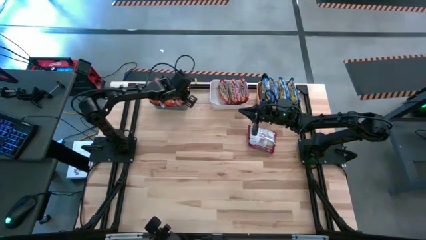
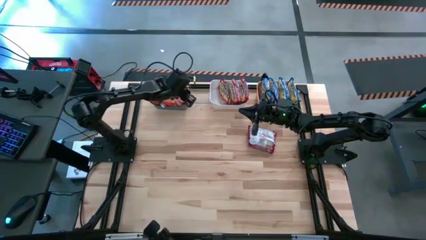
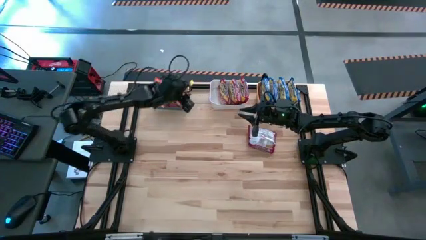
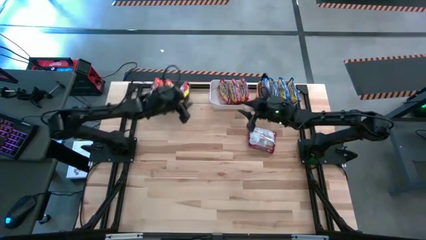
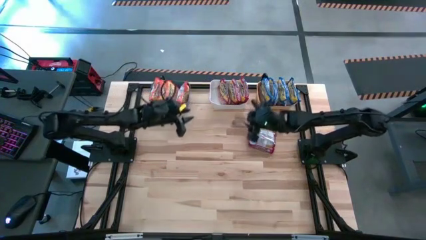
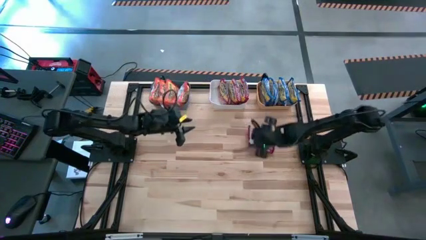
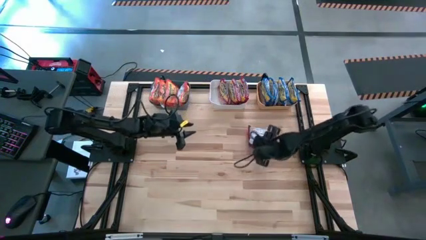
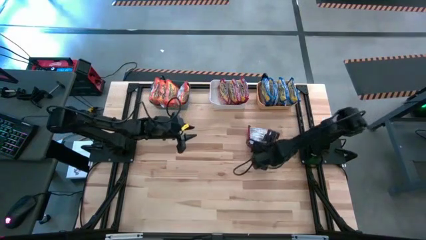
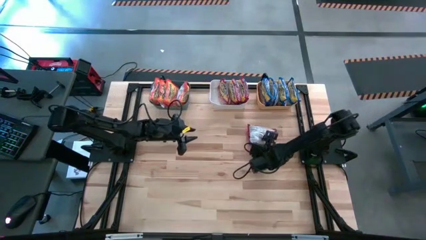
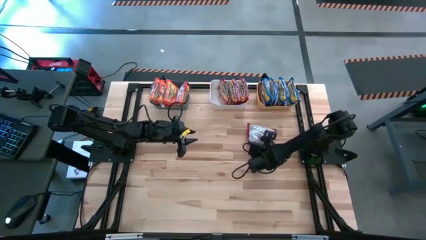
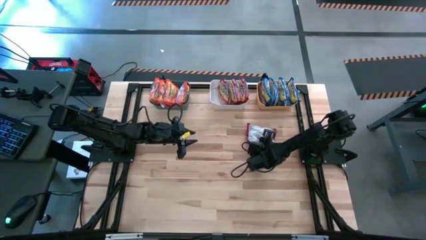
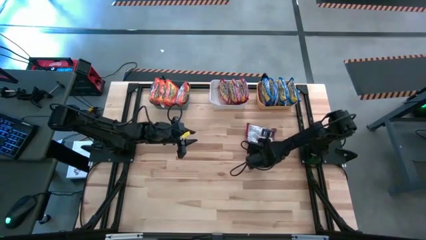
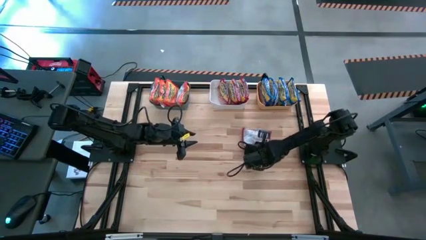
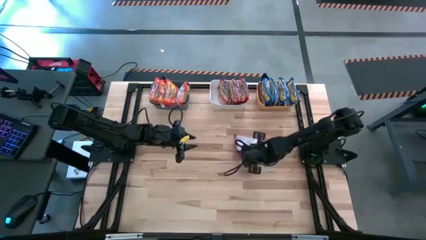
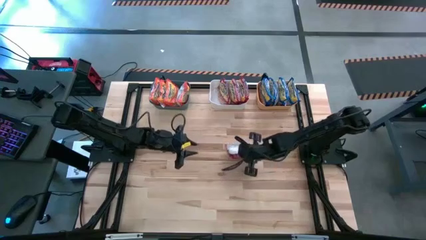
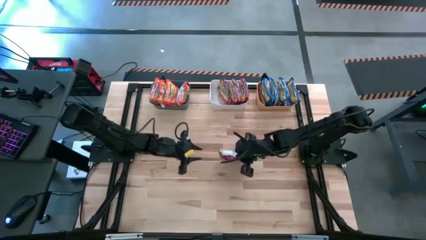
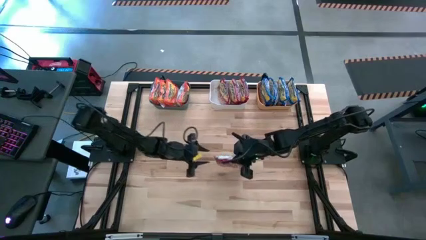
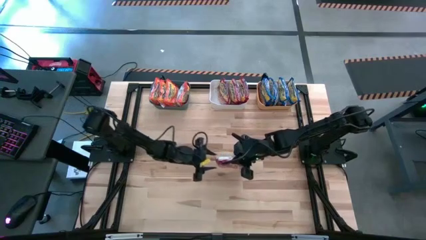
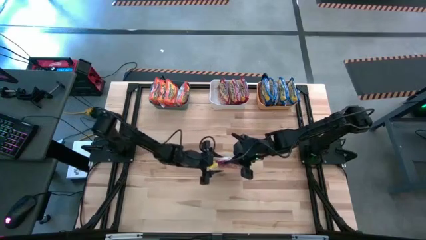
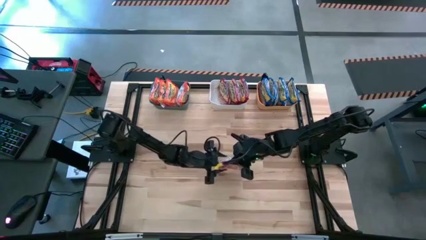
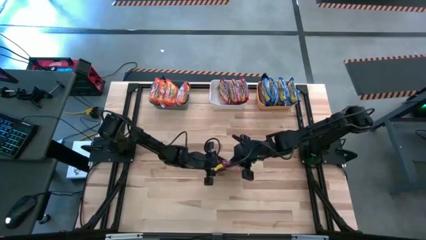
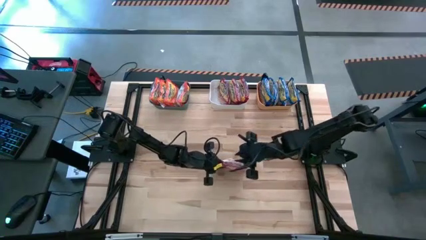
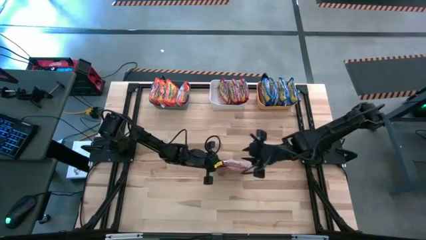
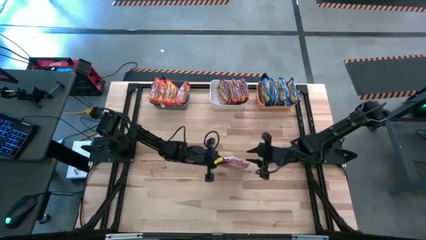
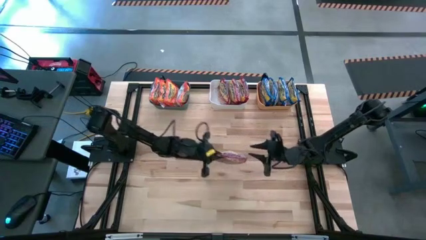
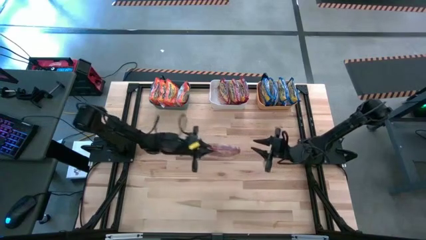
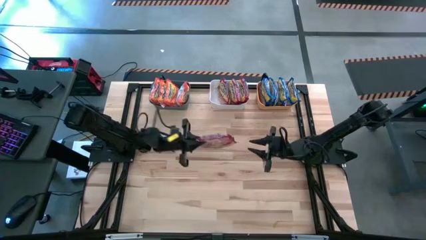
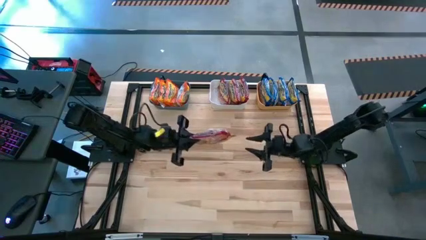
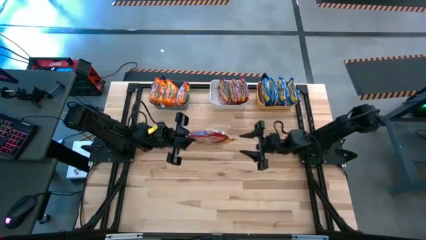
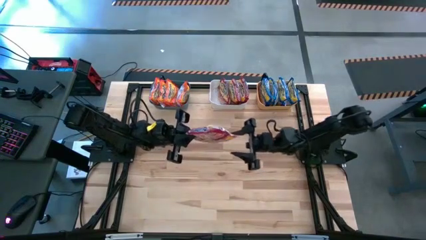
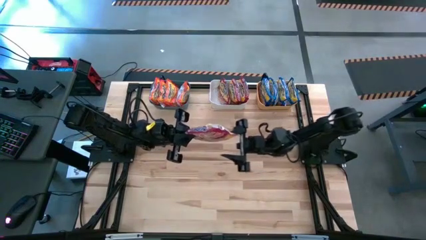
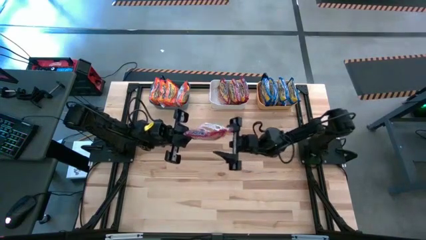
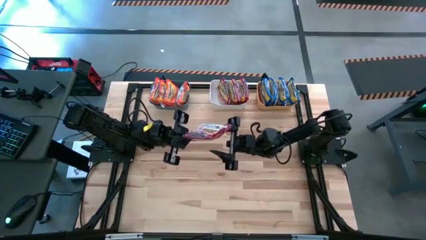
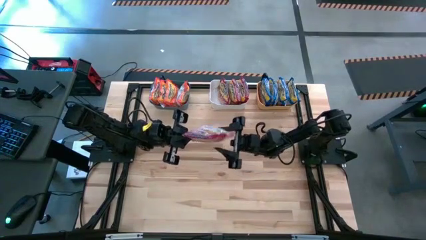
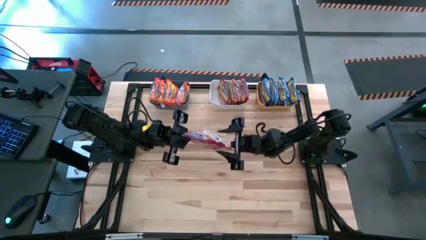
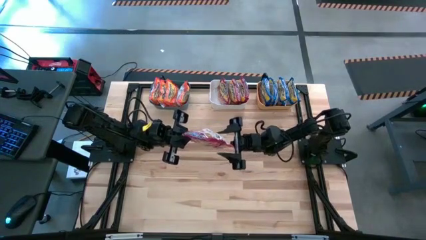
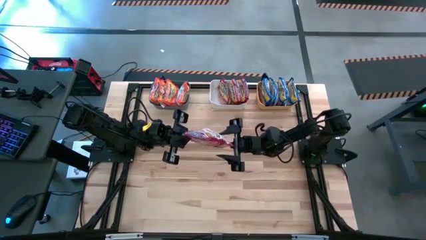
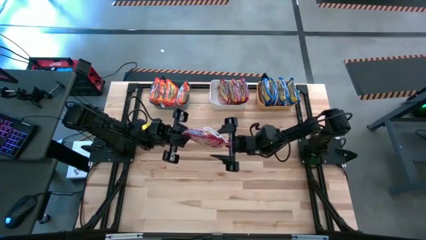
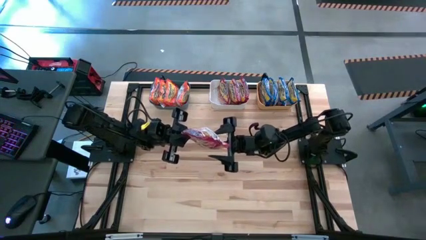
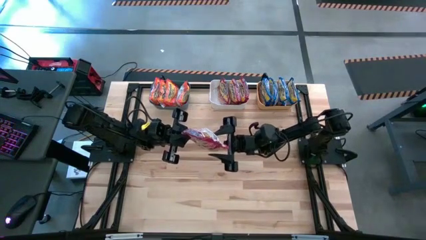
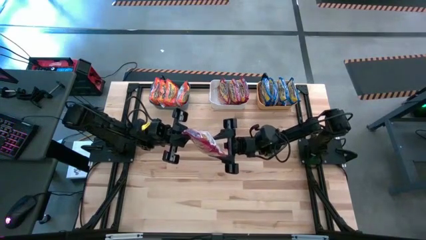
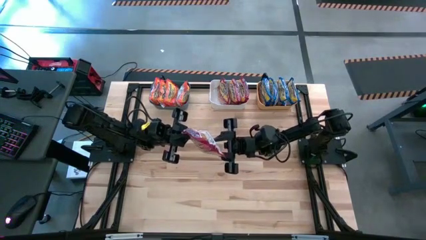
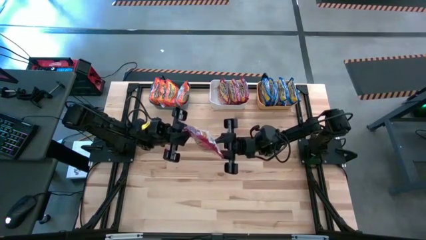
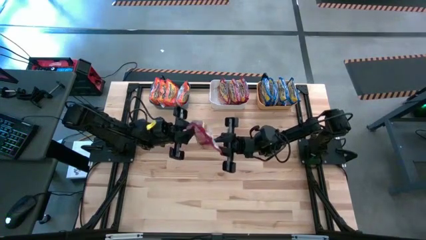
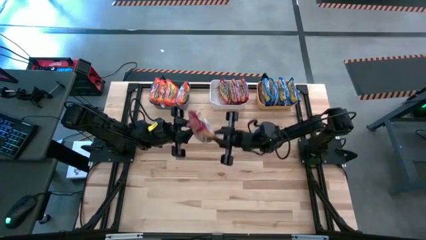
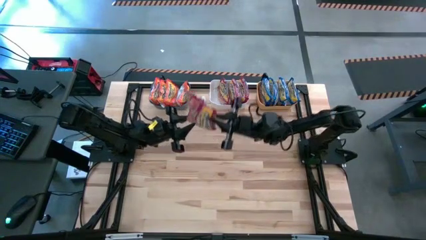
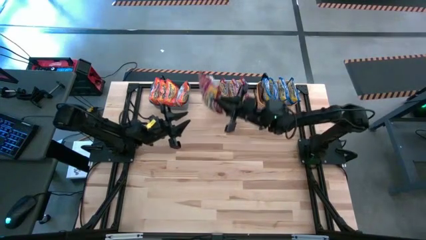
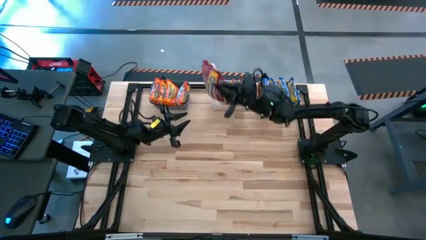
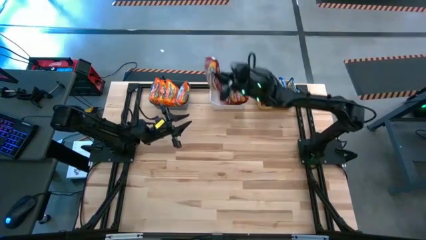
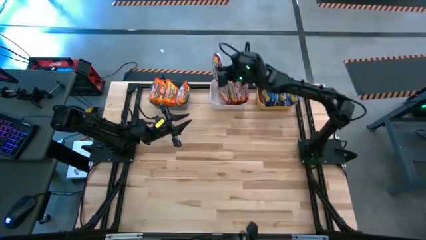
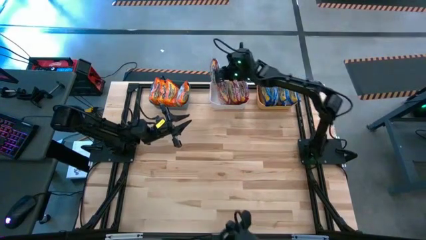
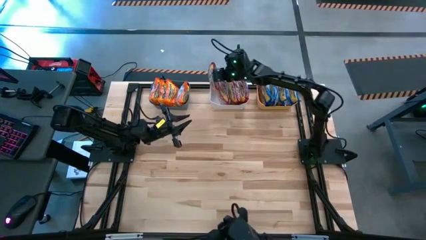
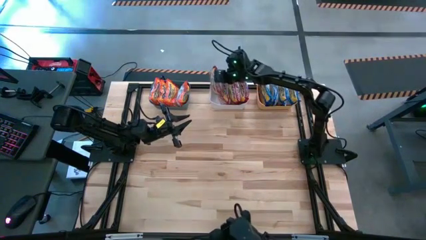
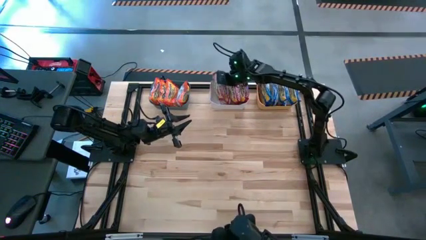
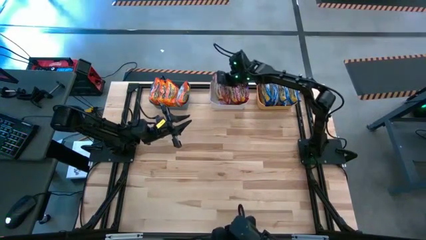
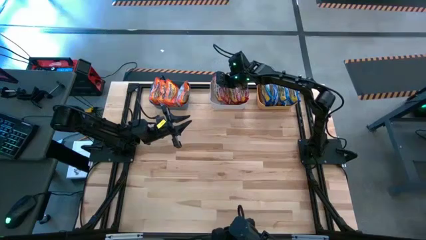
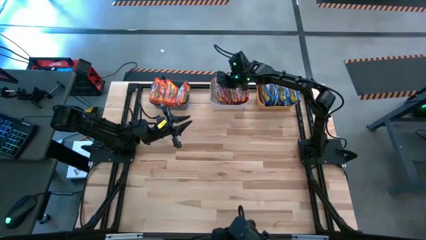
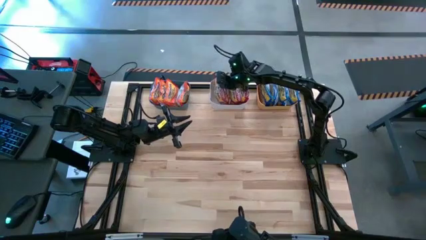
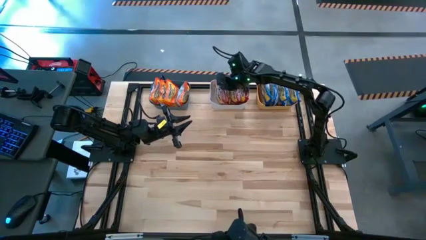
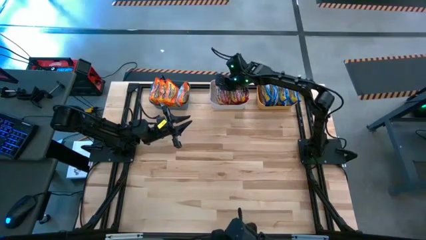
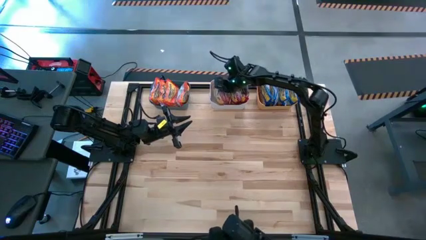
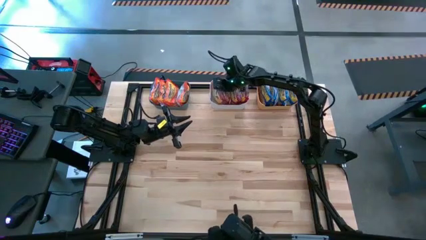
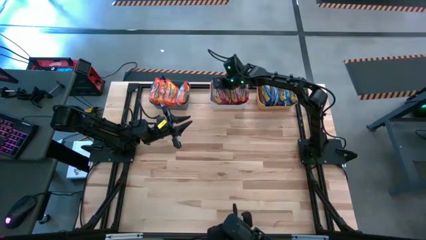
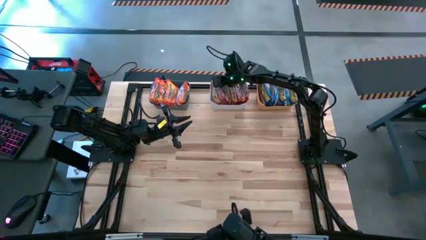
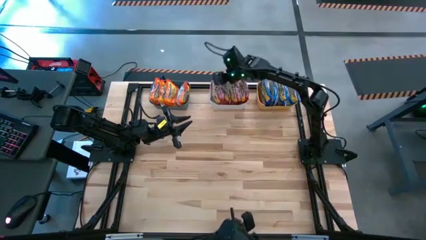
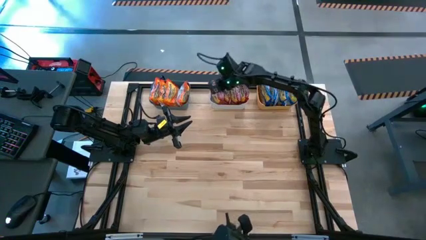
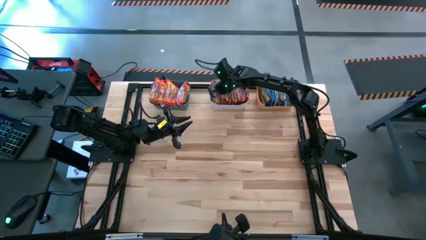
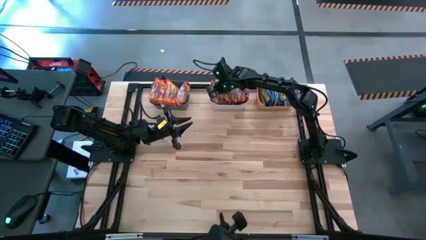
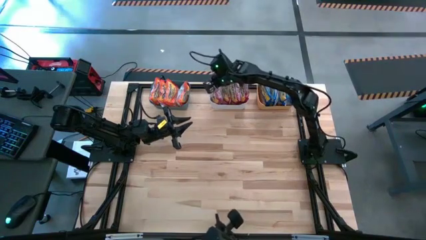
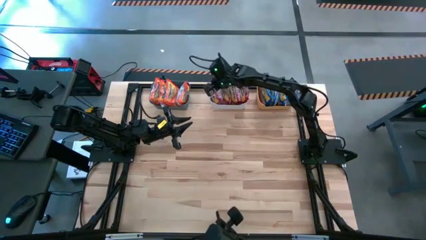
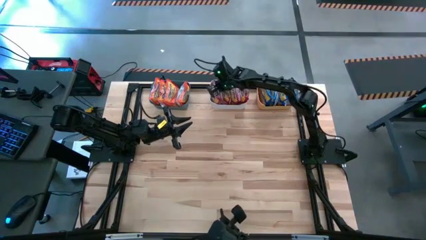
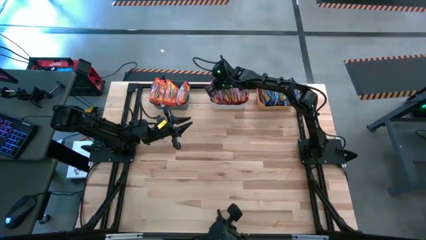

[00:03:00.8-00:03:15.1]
Task: Sort Maruchan noodles
Put the red noodle pack into the white bin

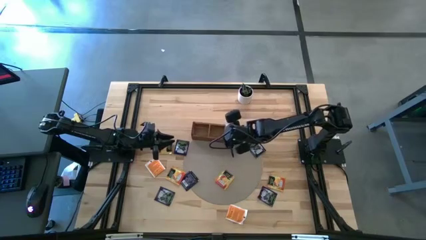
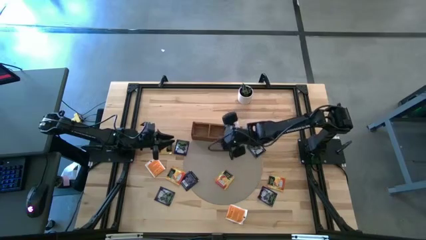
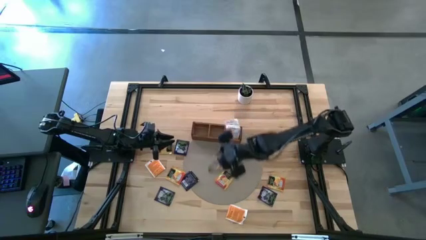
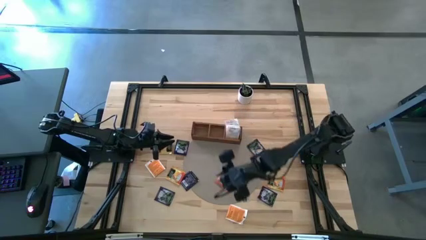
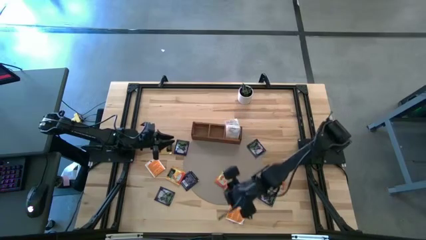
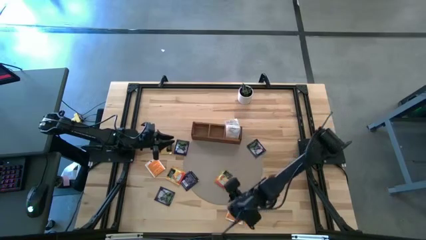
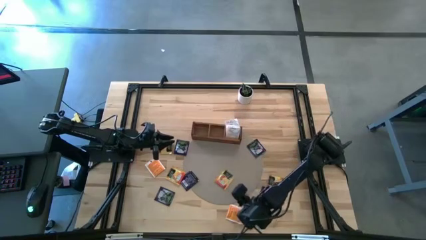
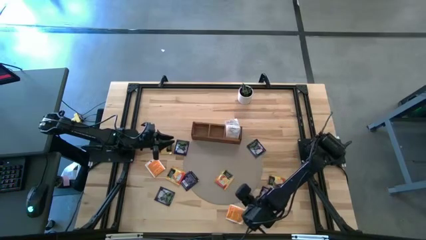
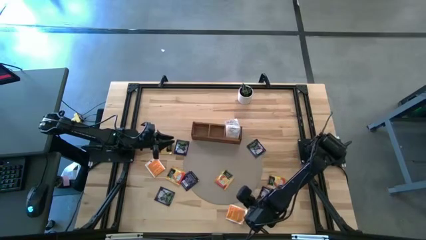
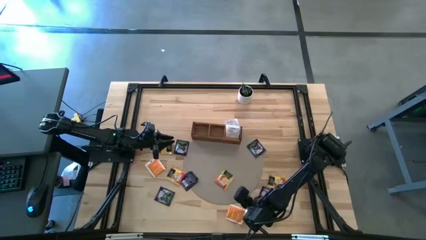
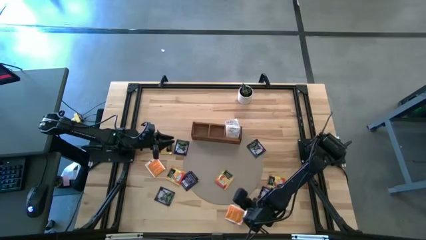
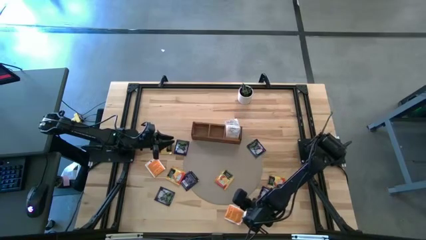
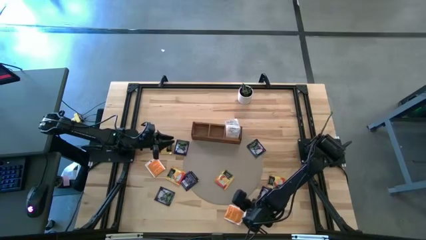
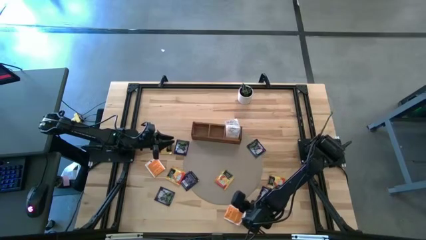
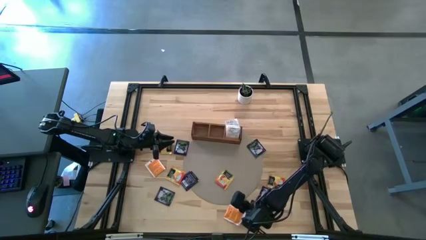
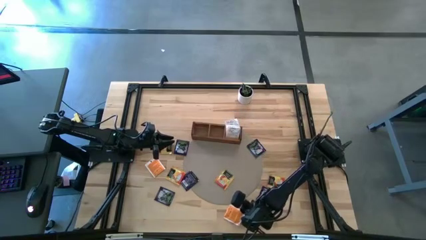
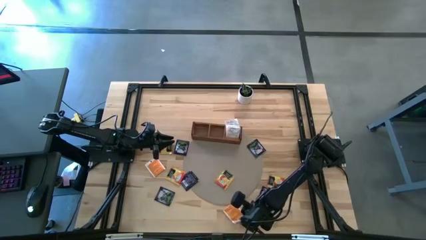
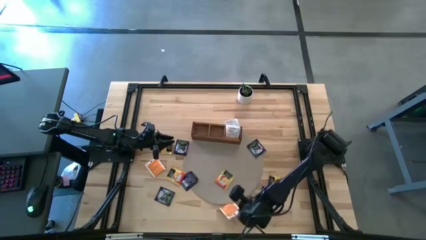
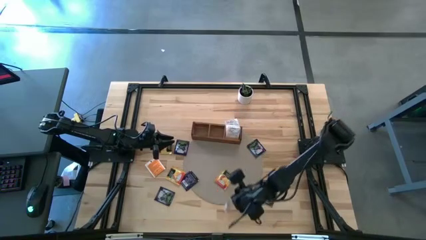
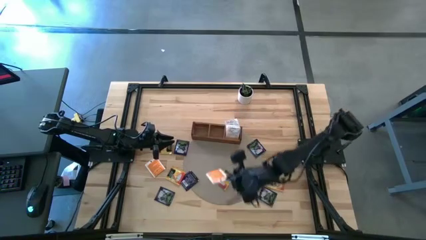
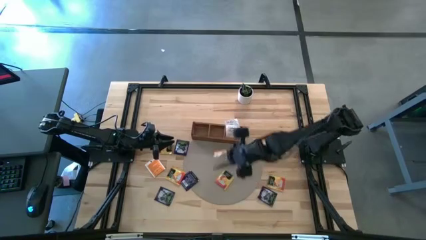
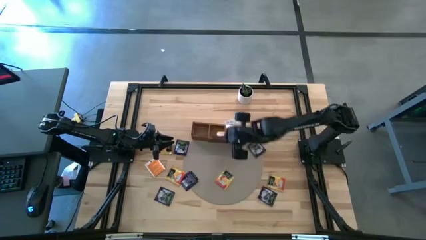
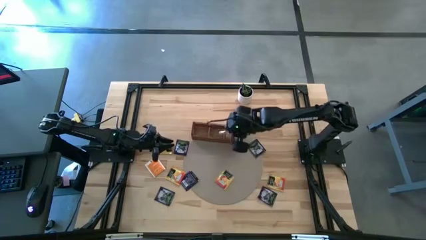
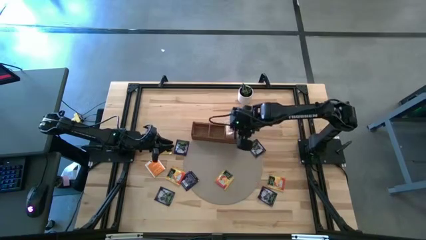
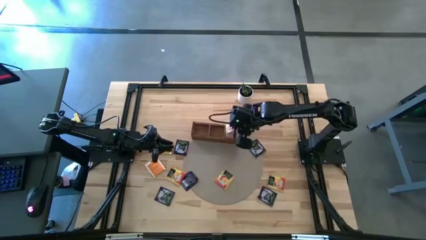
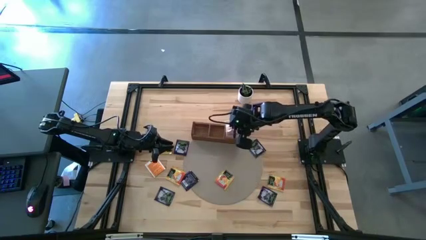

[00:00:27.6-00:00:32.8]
Task: Pick & Place Tea
Put the white tea bag into the right section of the wooden organizer
